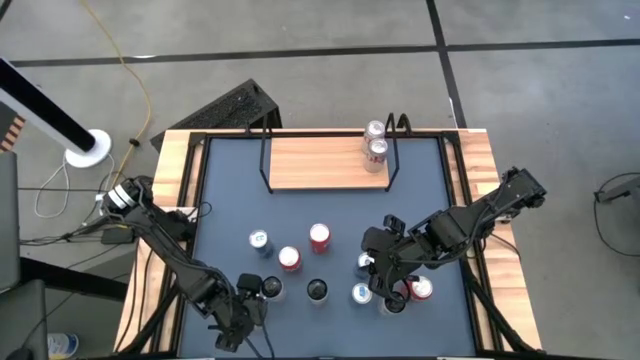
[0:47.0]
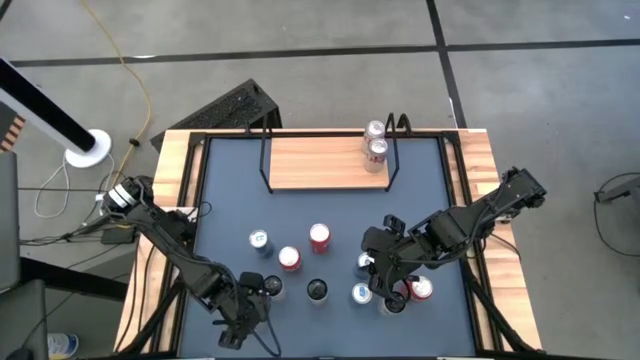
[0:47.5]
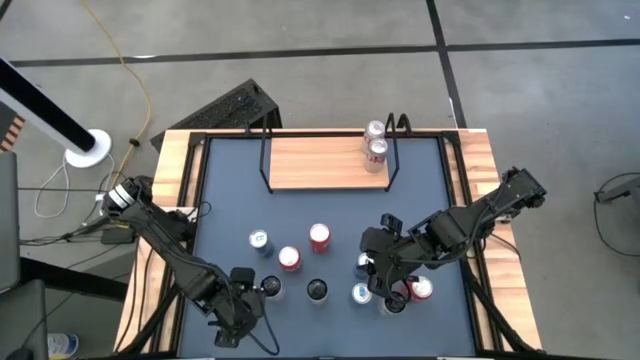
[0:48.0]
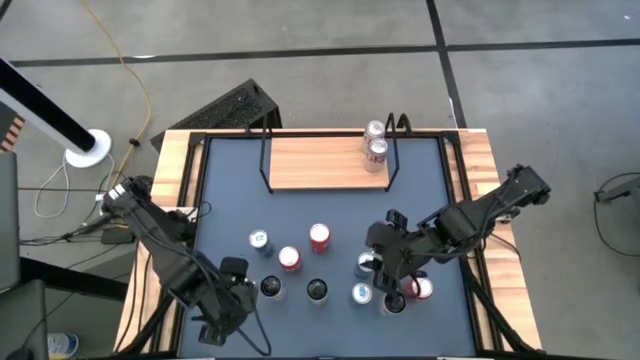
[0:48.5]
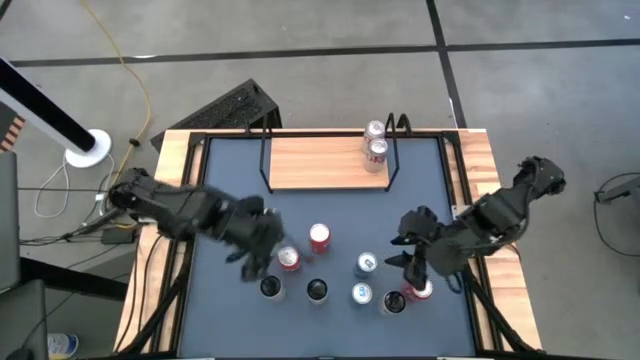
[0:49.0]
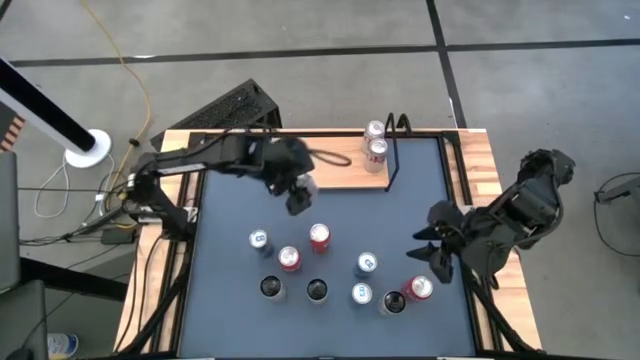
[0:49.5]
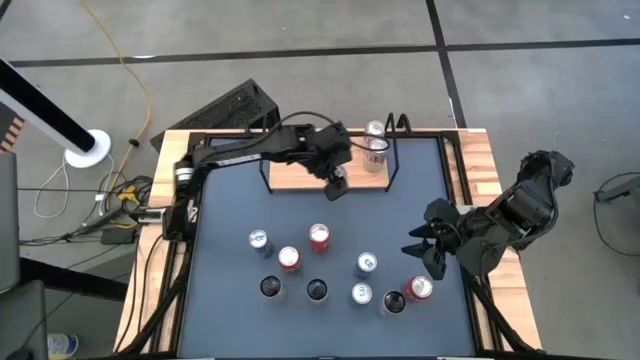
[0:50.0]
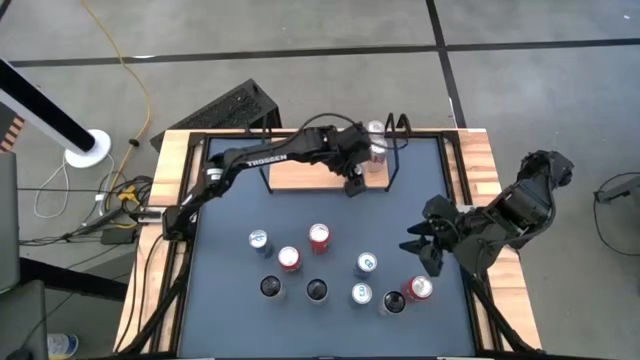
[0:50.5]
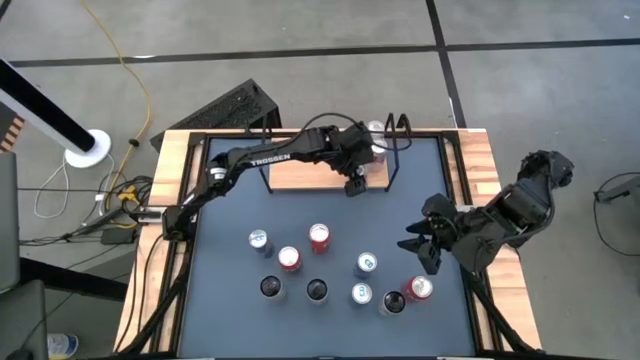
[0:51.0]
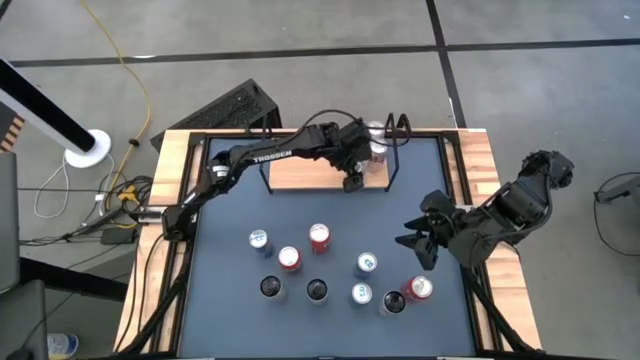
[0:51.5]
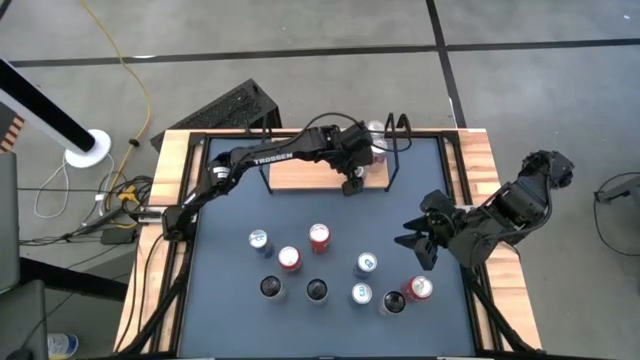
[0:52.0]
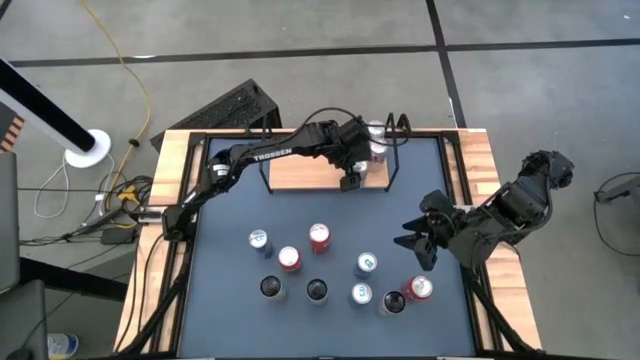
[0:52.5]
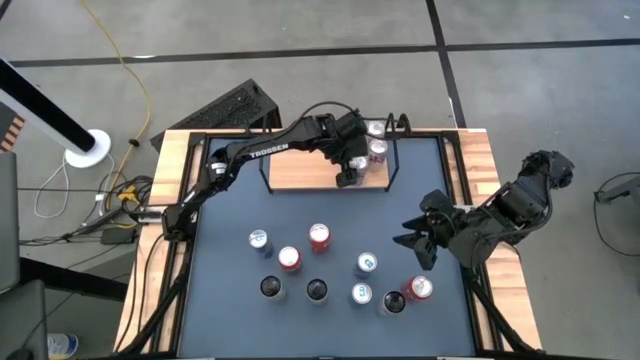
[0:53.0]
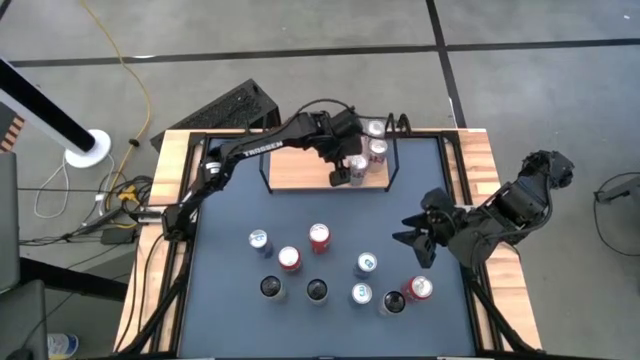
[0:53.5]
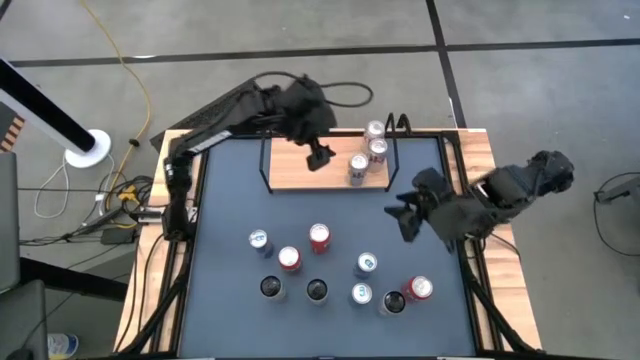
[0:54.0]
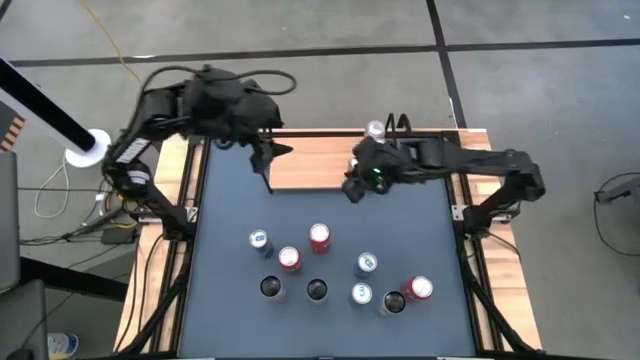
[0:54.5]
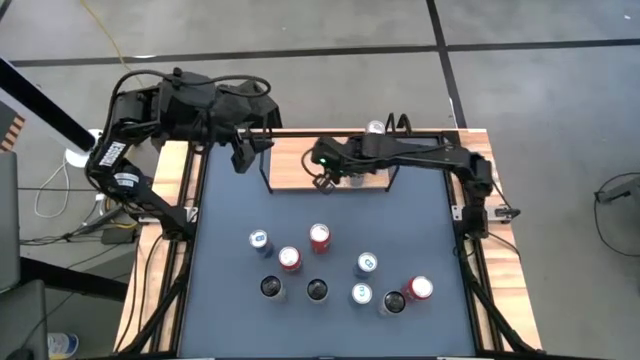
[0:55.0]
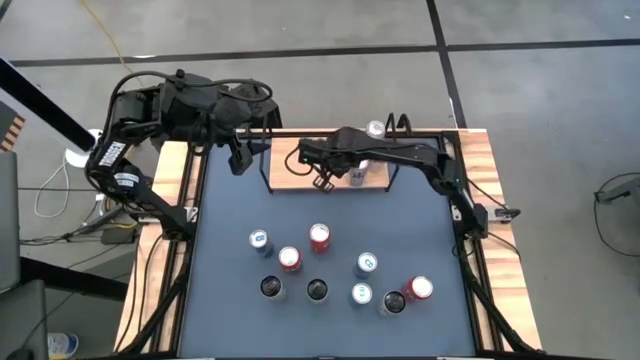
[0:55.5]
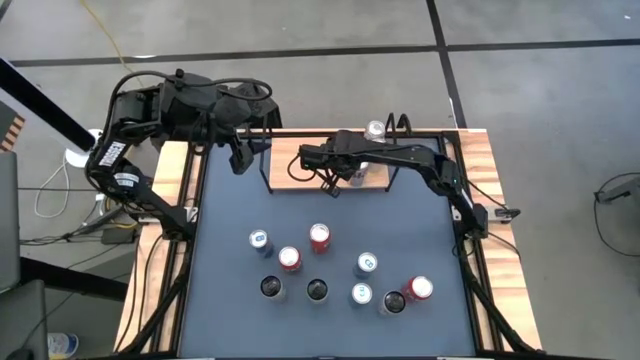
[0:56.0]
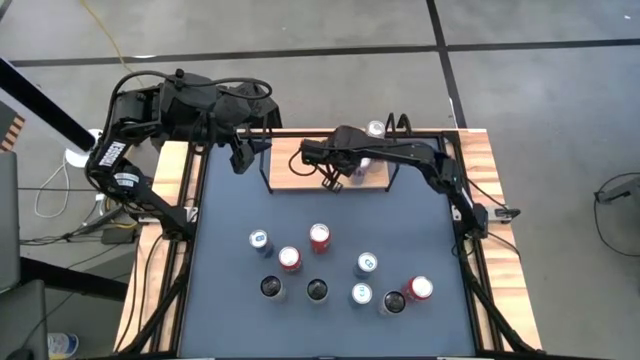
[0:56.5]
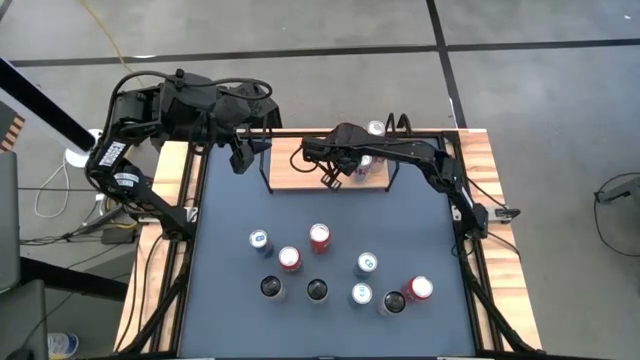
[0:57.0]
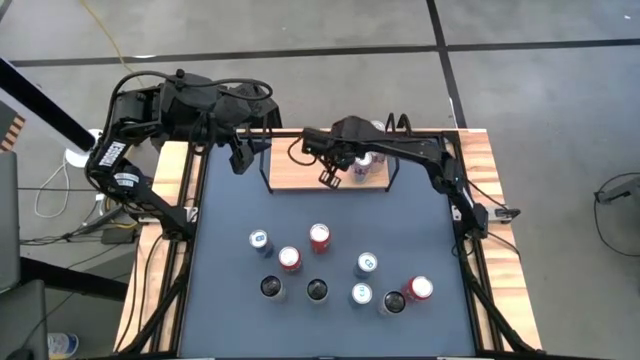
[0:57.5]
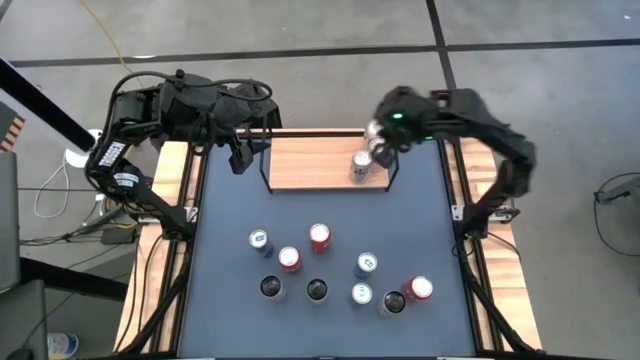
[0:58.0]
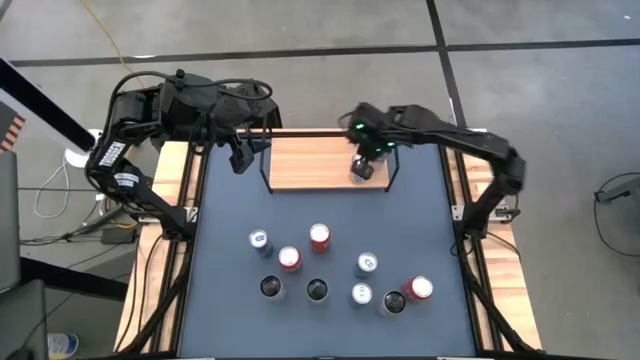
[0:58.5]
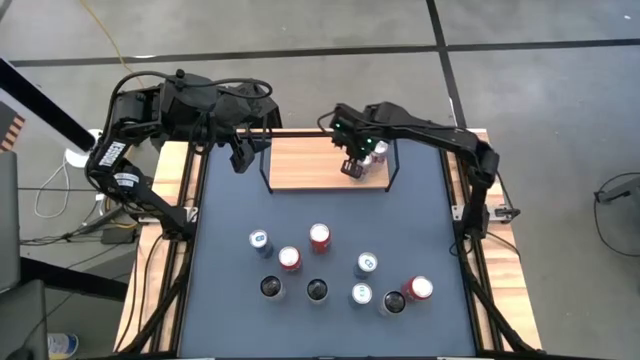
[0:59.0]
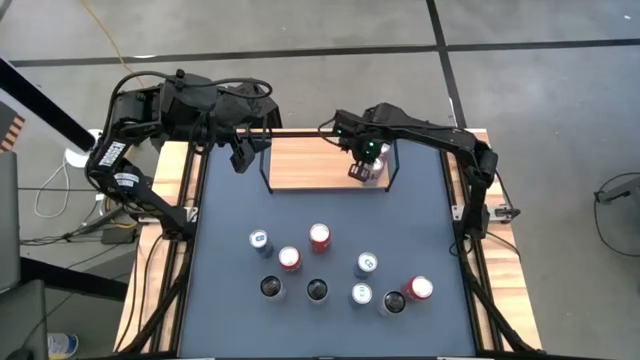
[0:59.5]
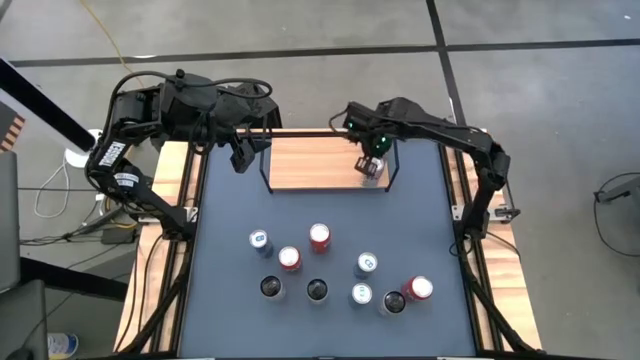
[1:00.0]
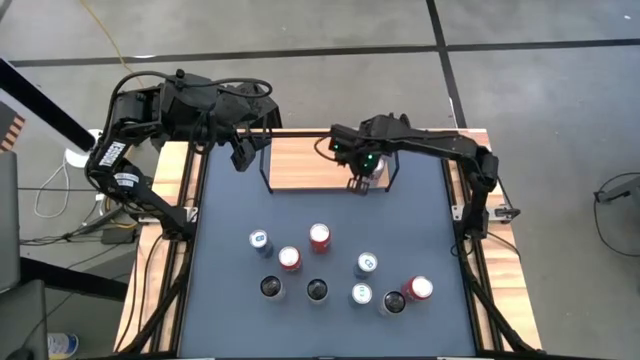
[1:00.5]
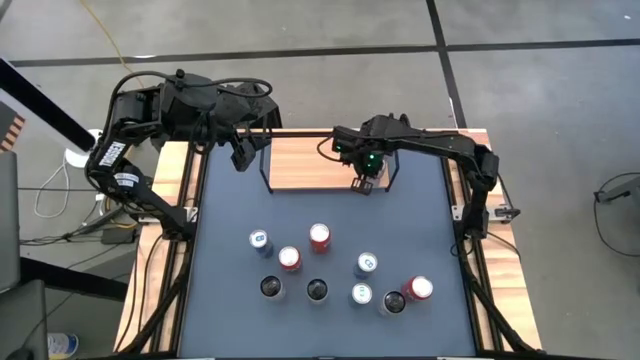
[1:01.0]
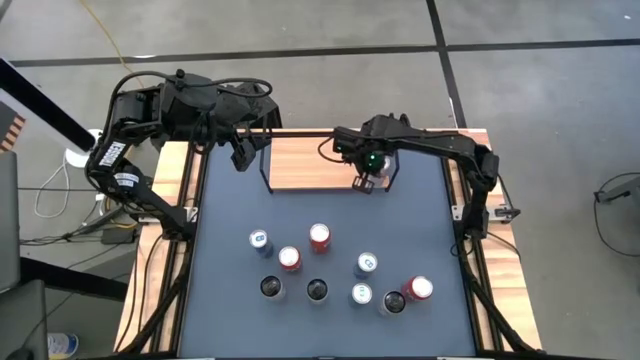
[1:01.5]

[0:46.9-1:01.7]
Task: Place canned beverage on shelf
Put the silver soda can on the shelf aligned with the other silver soda cans

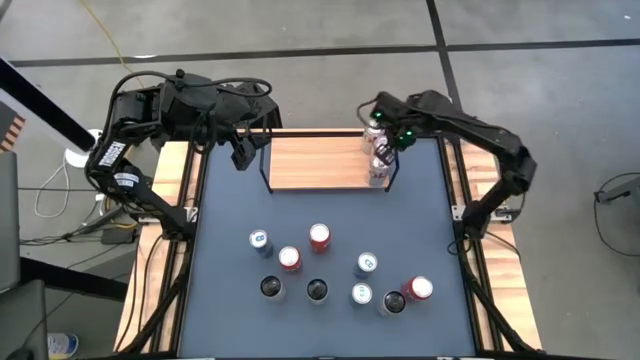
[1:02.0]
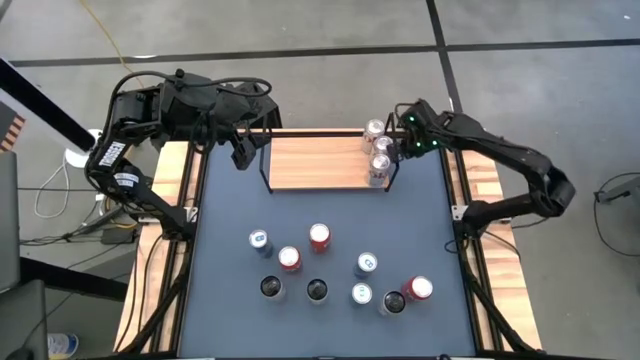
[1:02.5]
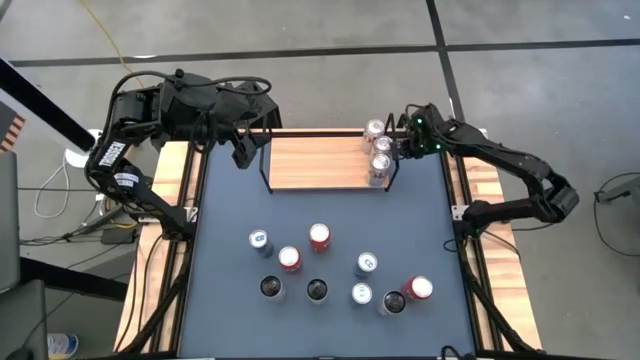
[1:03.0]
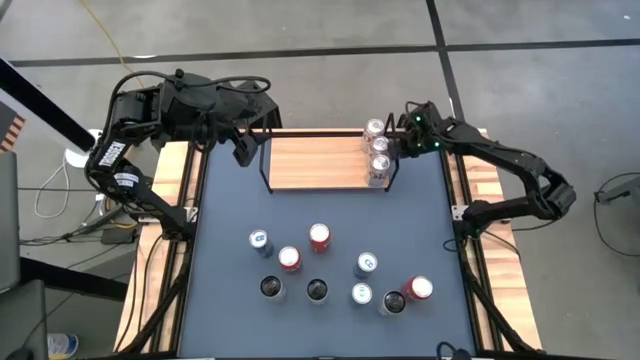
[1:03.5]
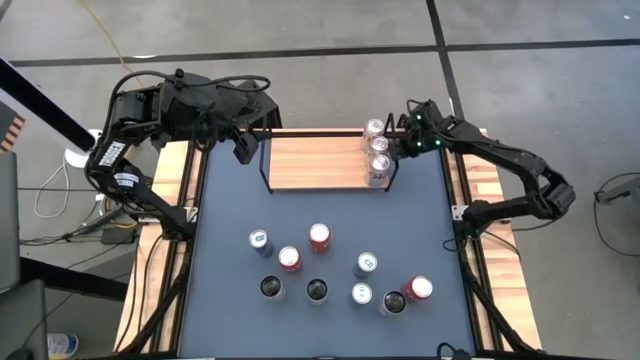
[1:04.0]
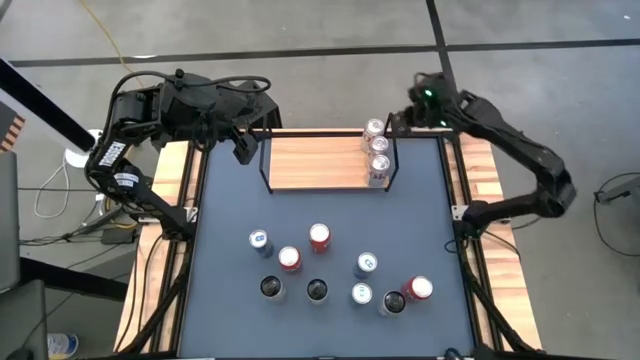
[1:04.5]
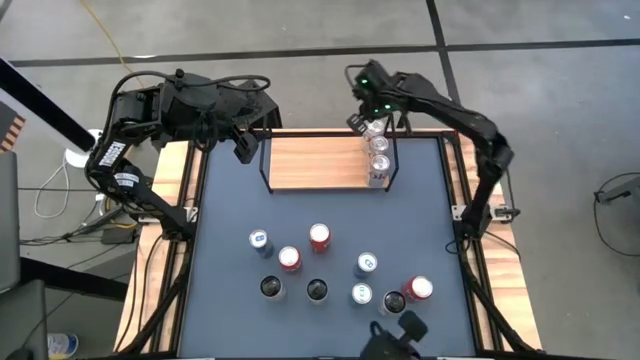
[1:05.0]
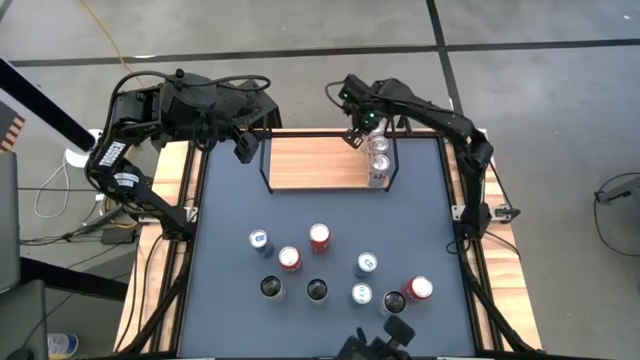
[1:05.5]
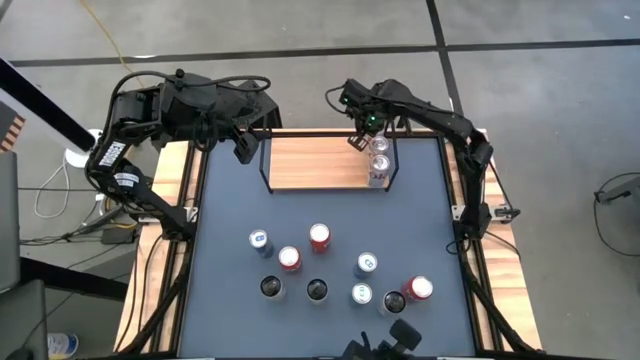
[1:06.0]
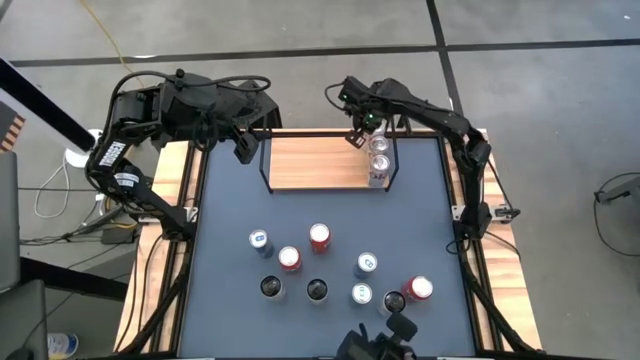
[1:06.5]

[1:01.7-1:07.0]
Adjust the silver soda cans on the shelf

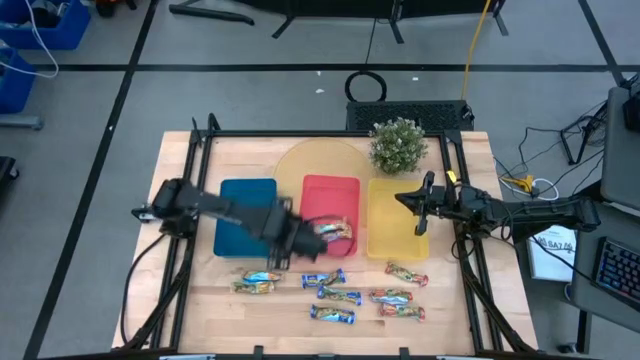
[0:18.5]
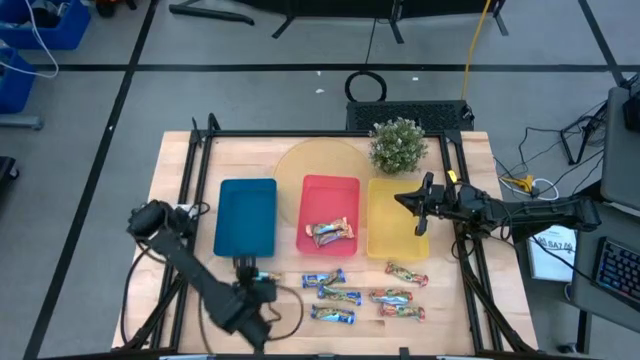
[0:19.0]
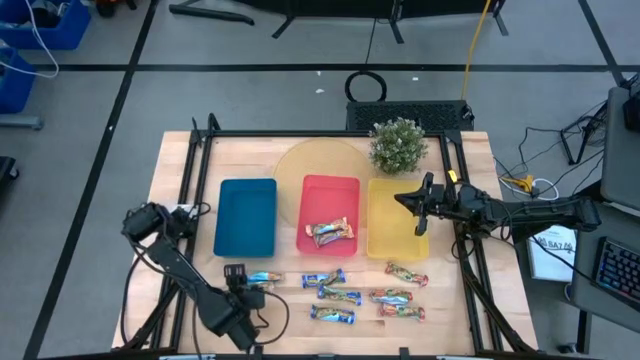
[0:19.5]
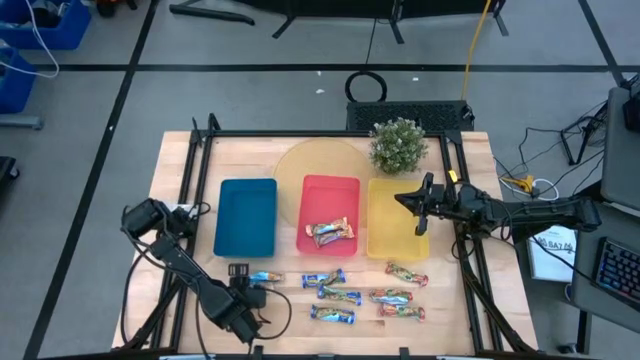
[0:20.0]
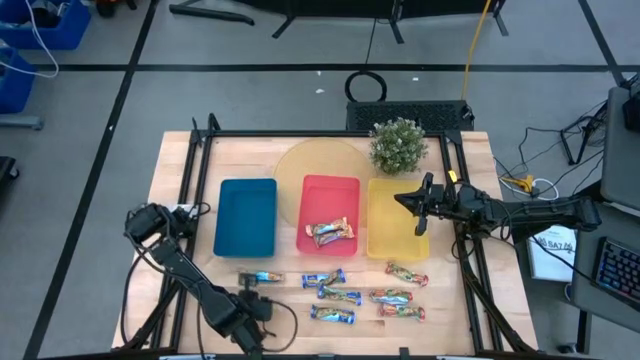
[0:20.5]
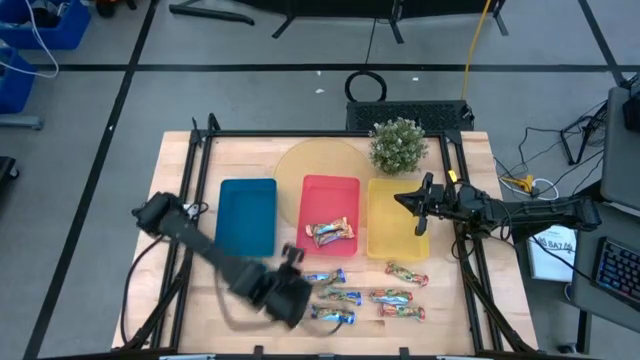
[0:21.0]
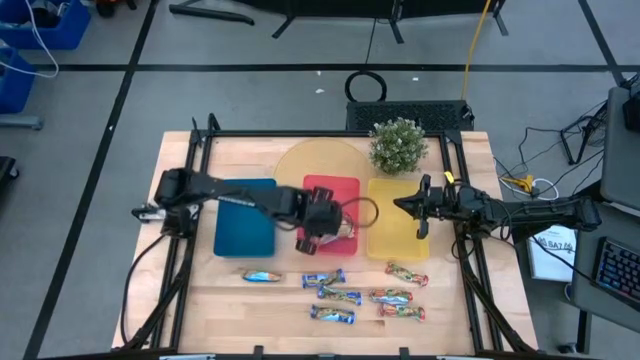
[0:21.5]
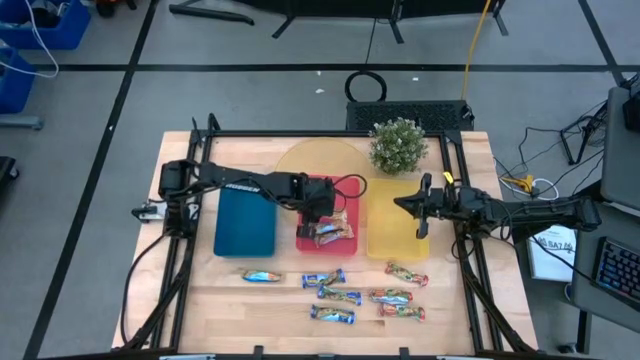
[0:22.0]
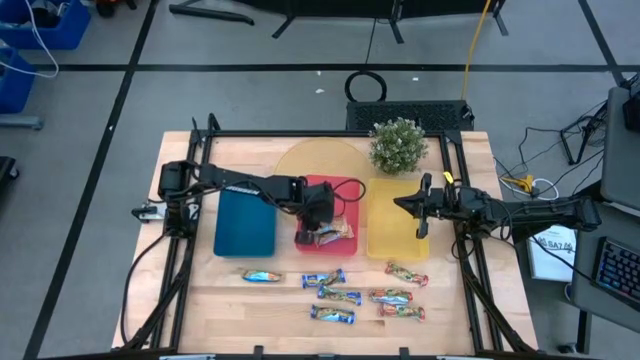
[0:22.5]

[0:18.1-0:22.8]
Task: Pick and place Granola Bars by type
Put the yellow granola bar into the red bin
